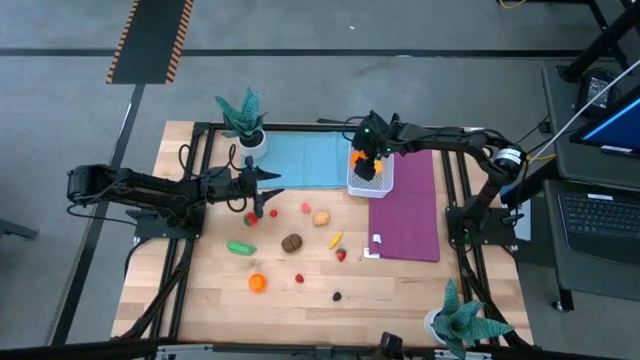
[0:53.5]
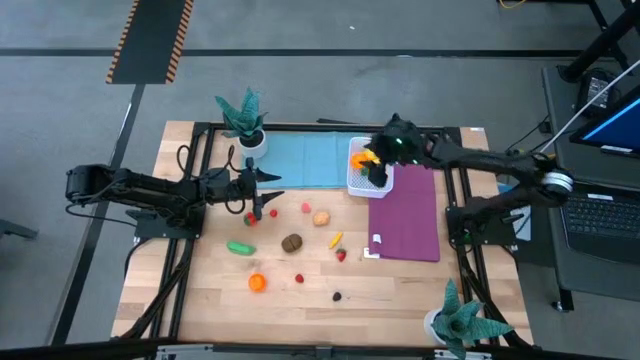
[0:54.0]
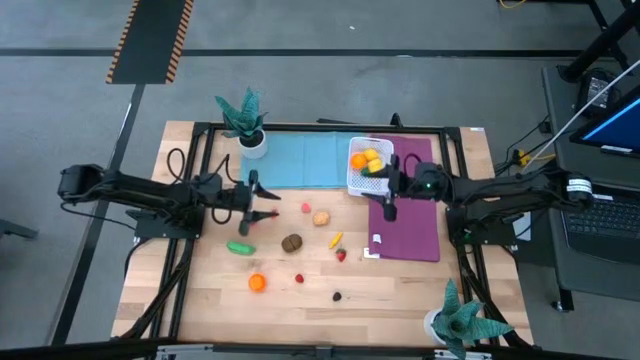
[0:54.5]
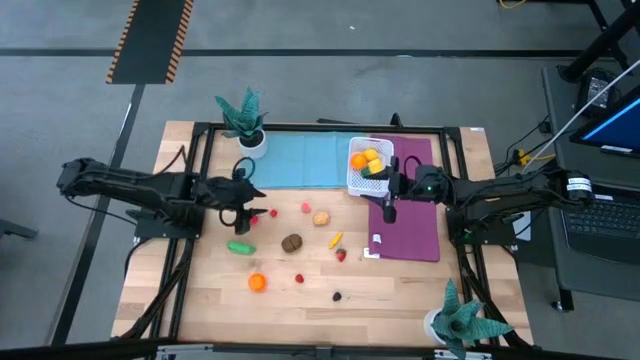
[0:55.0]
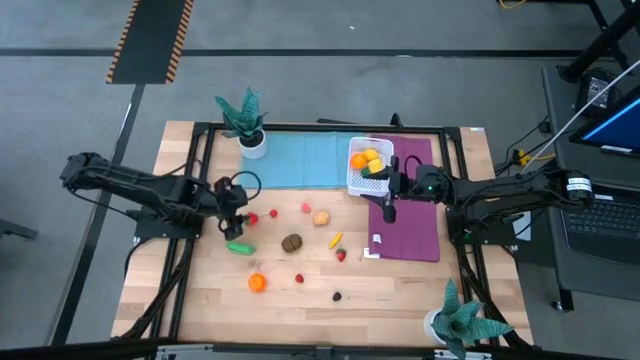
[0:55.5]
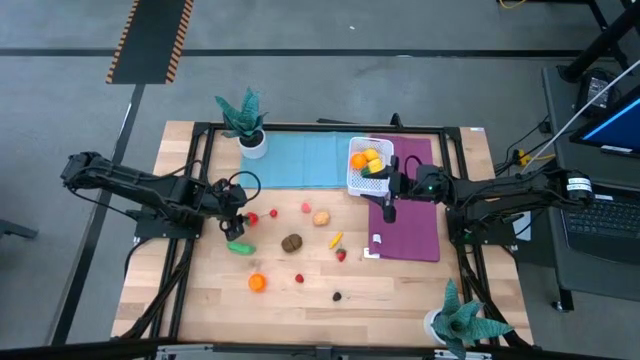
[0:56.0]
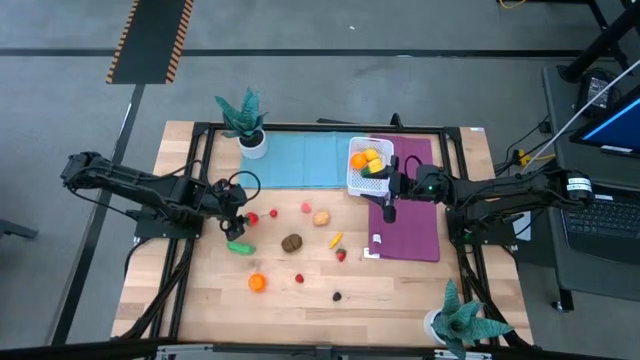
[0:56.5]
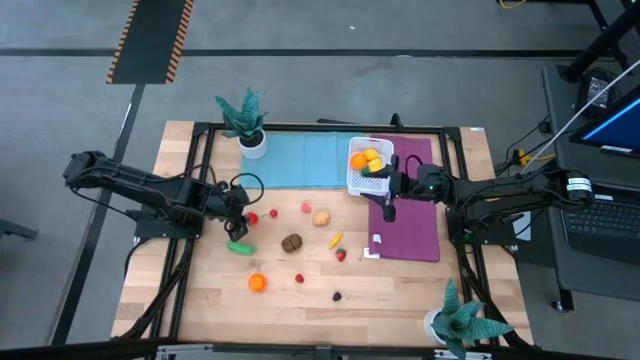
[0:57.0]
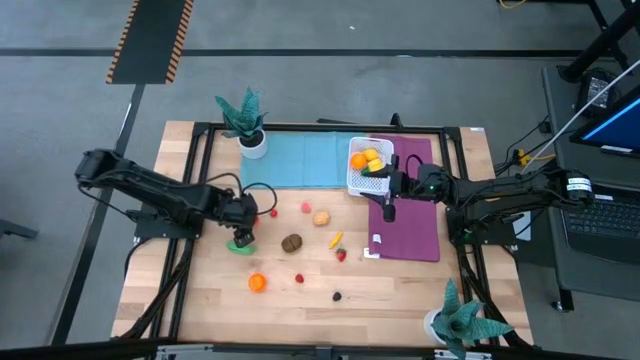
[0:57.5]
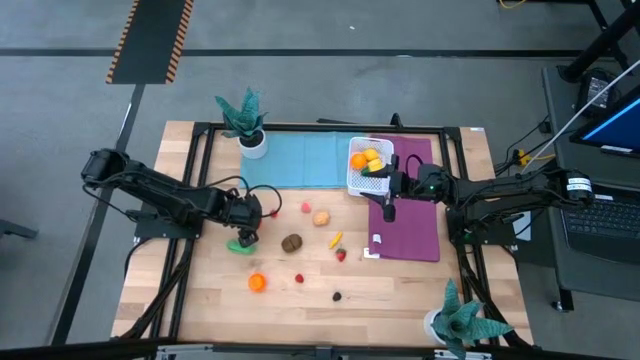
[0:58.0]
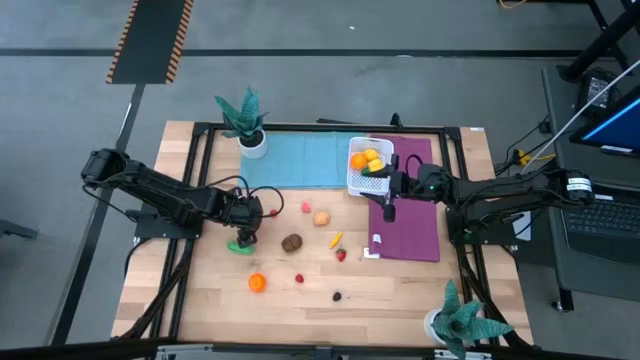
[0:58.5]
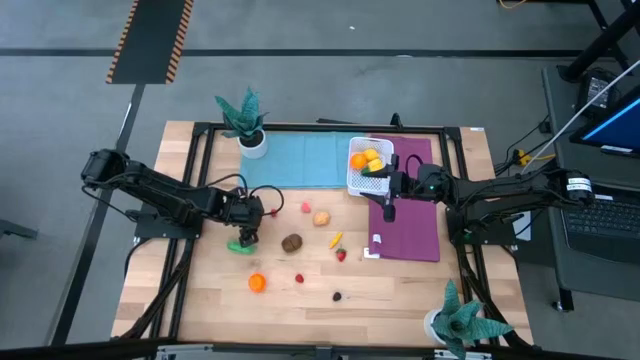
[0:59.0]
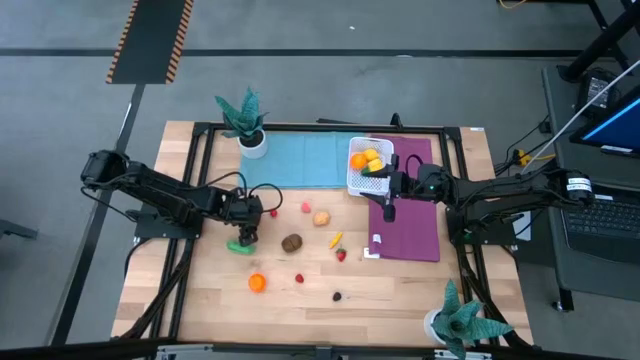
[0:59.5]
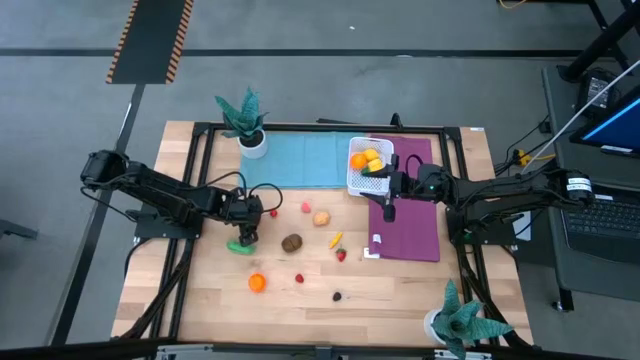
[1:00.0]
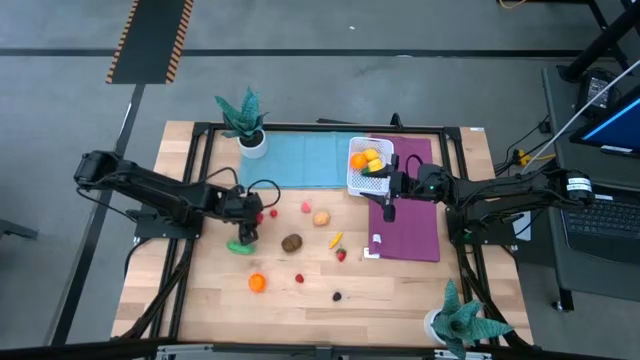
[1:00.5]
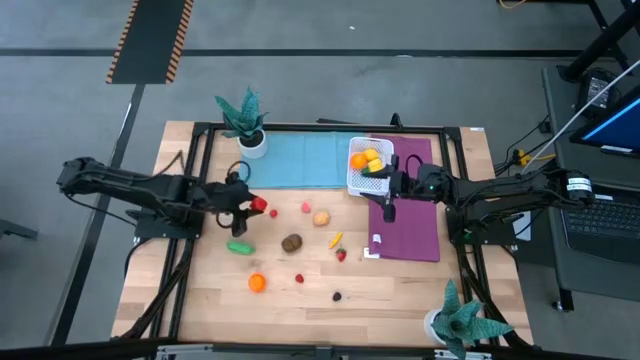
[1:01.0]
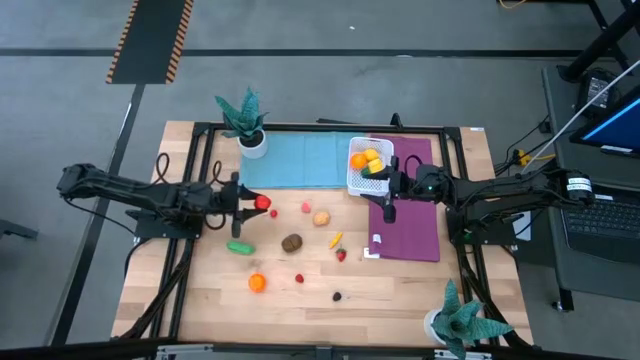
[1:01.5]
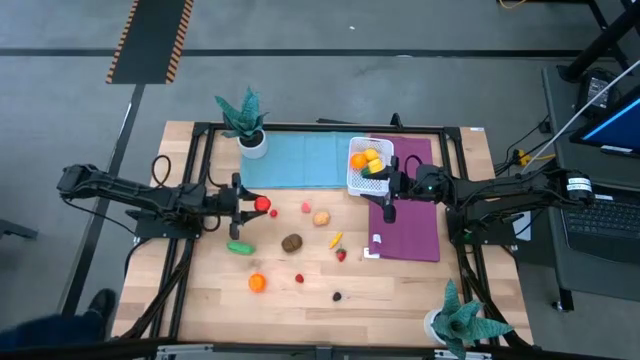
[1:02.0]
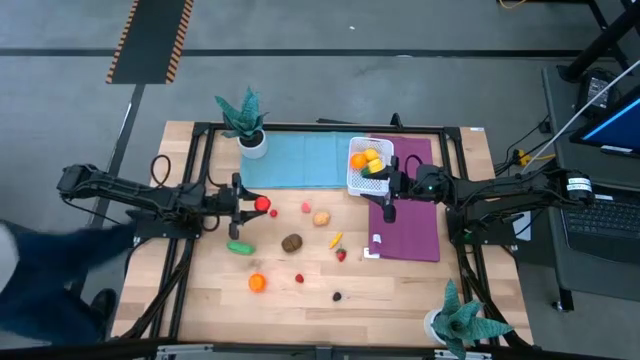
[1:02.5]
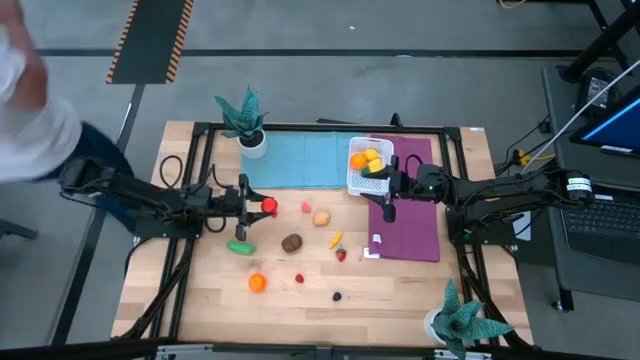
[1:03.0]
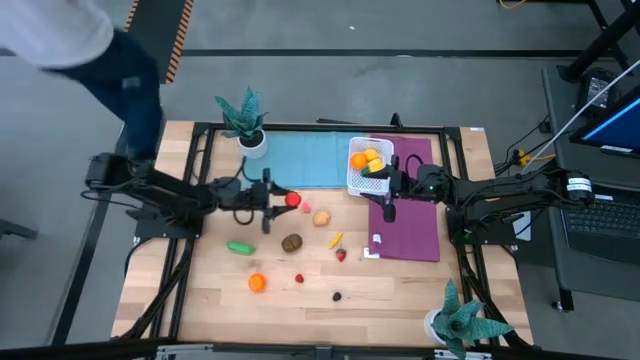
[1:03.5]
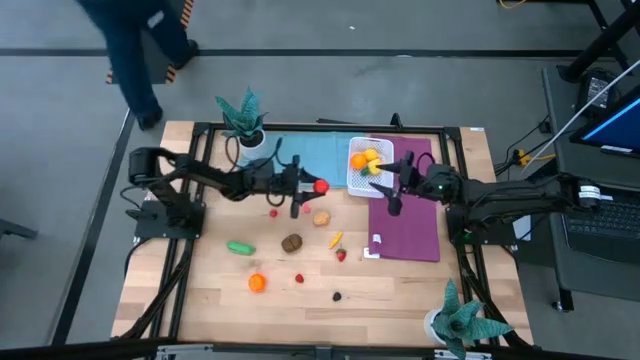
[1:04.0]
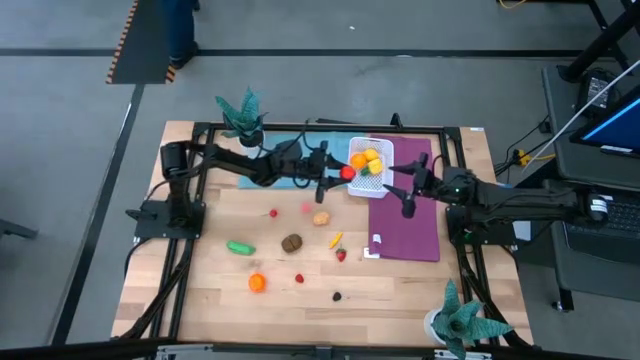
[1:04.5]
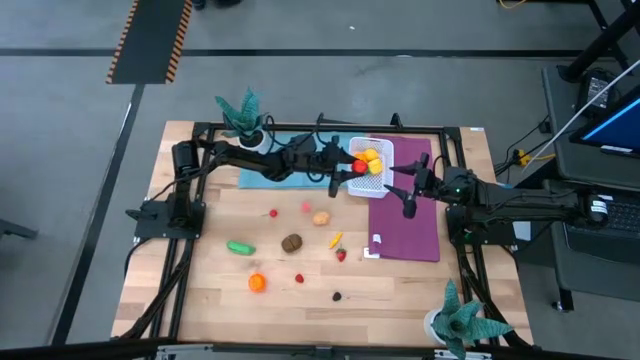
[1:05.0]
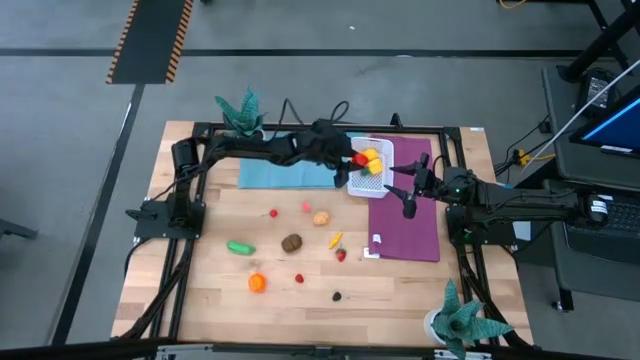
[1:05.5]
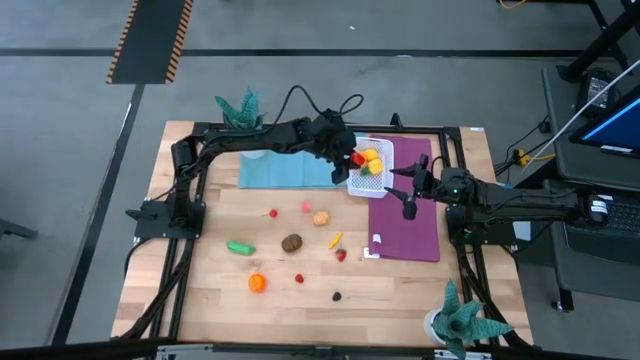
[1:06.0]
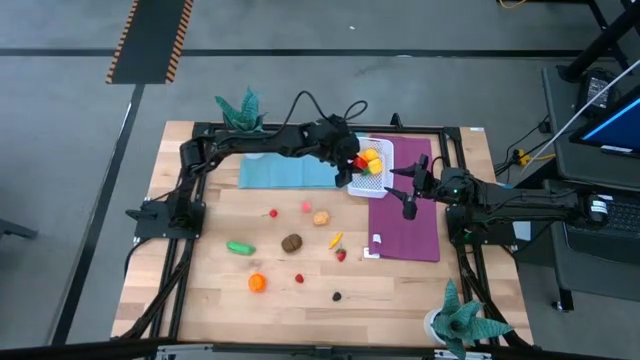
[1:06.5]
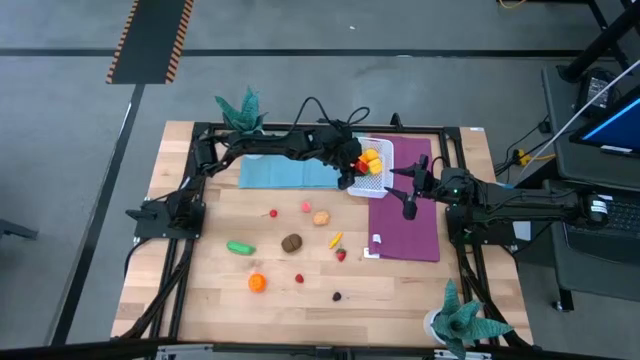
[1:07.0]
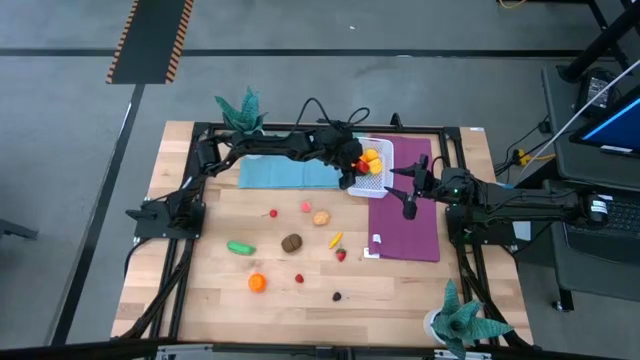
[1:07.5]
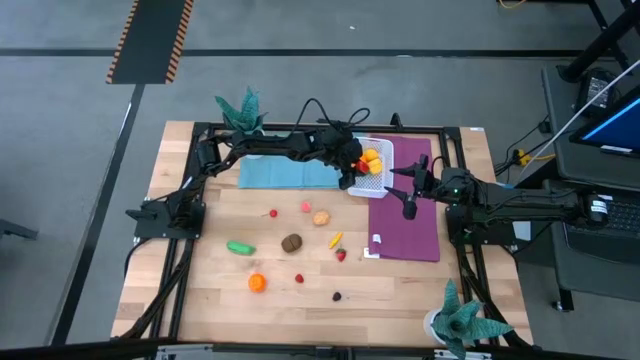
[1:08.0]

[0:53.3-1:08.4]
Task: Pick and placing Produce into tupperware
Put the left red strawberry into the white container

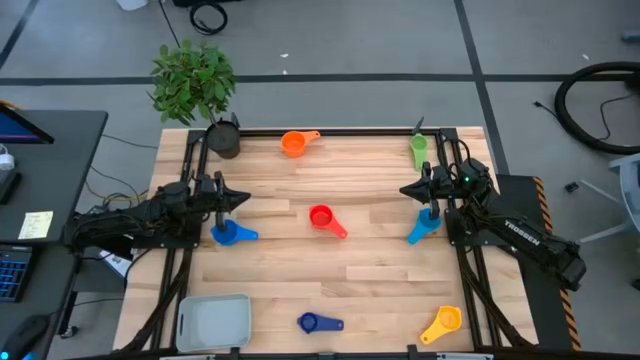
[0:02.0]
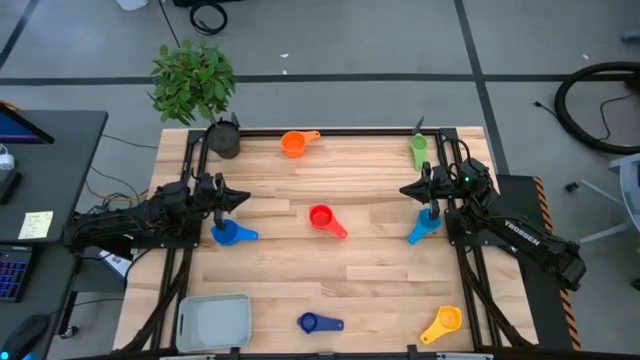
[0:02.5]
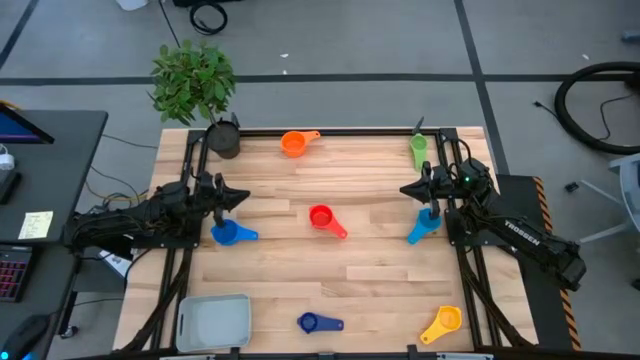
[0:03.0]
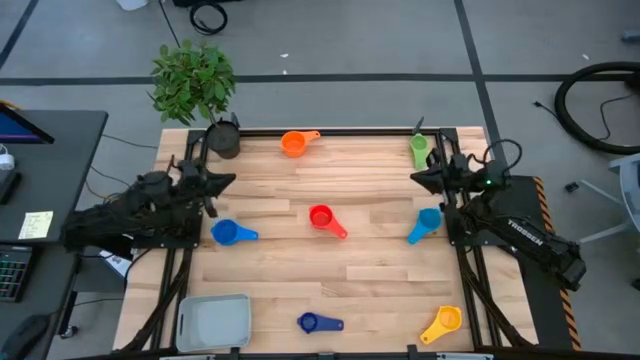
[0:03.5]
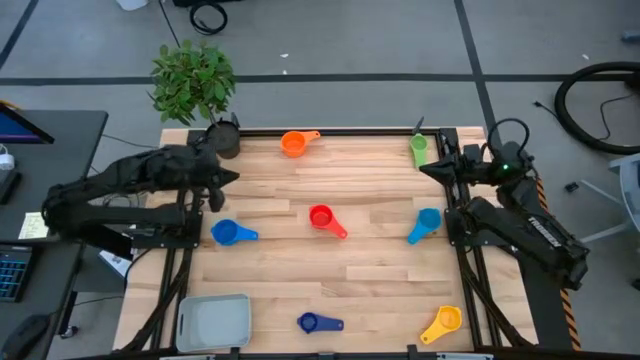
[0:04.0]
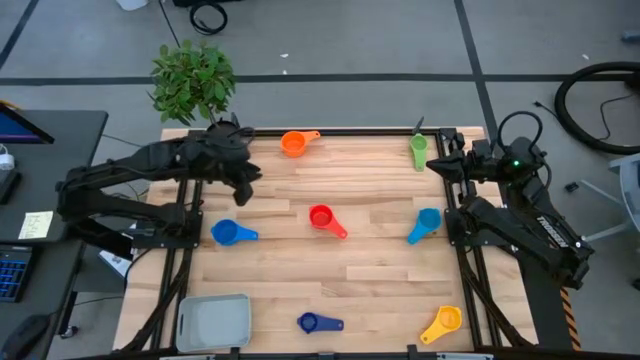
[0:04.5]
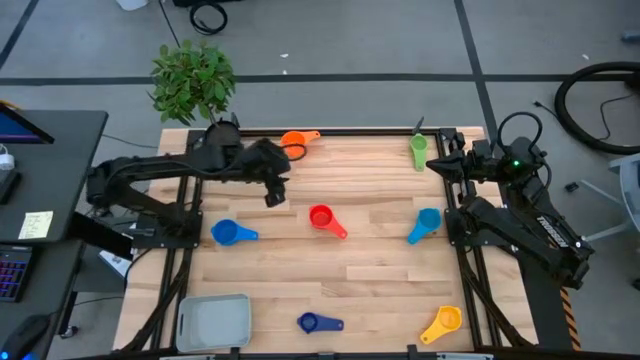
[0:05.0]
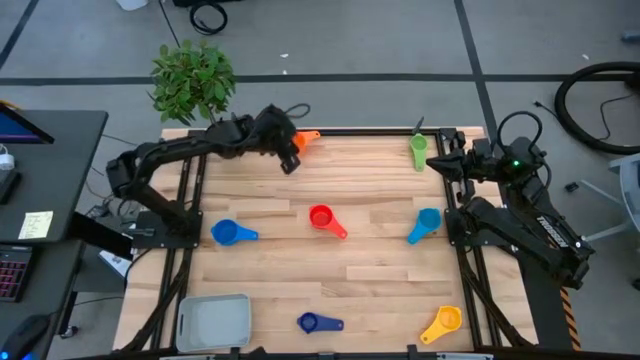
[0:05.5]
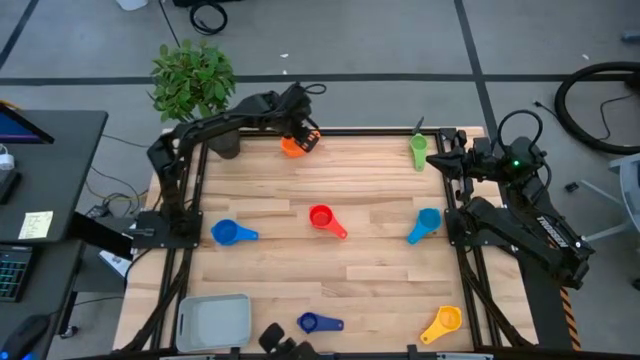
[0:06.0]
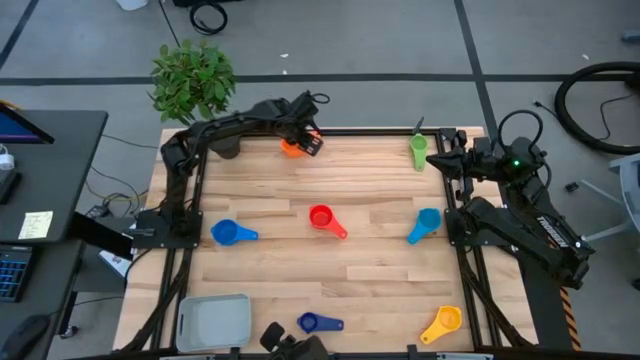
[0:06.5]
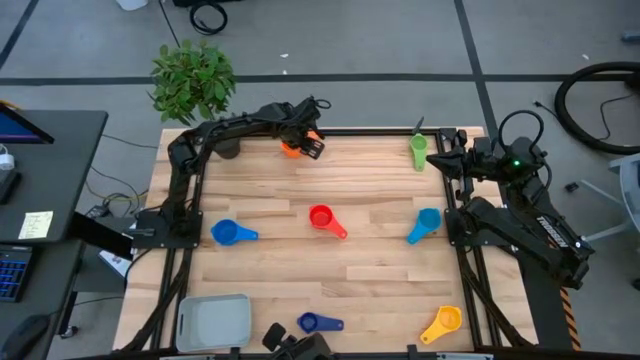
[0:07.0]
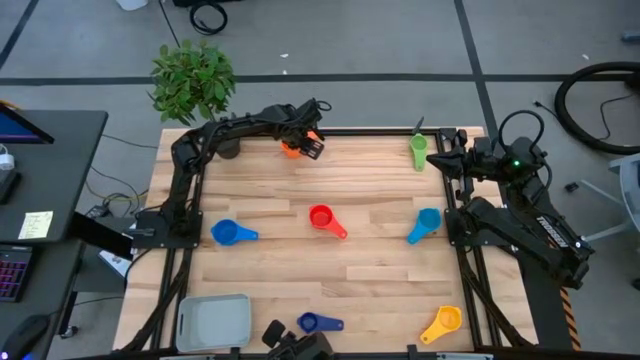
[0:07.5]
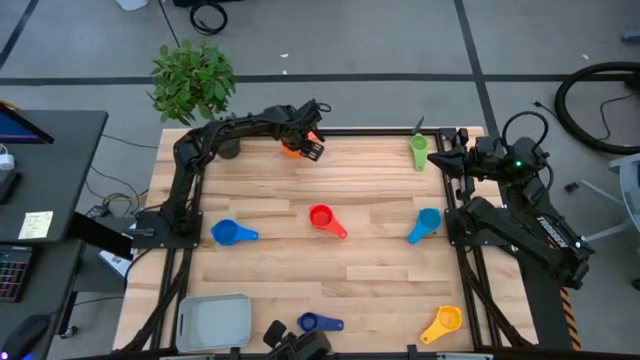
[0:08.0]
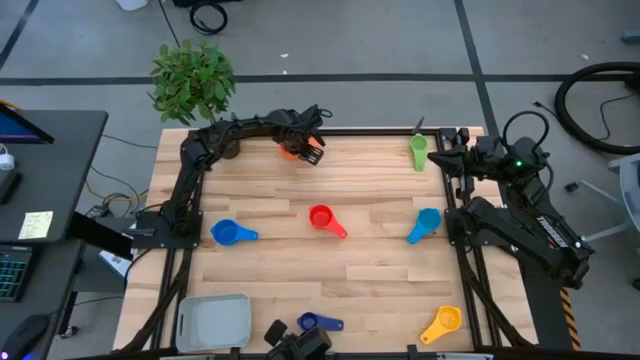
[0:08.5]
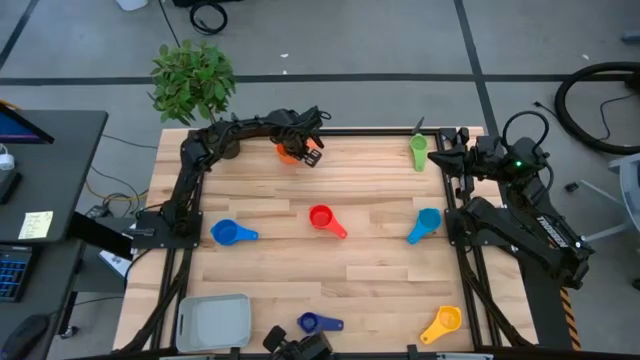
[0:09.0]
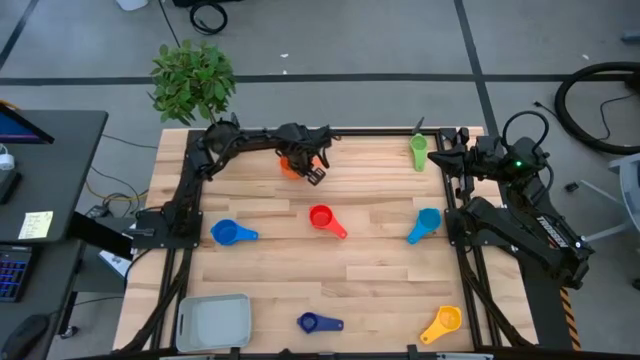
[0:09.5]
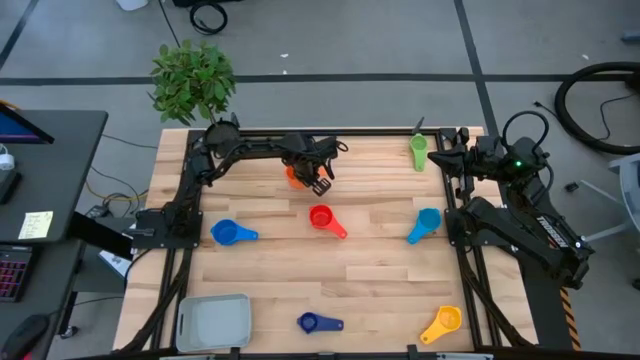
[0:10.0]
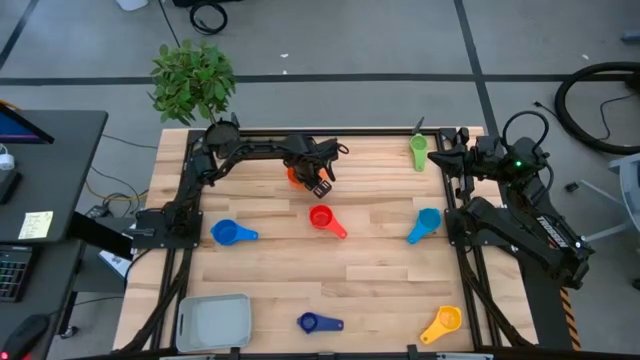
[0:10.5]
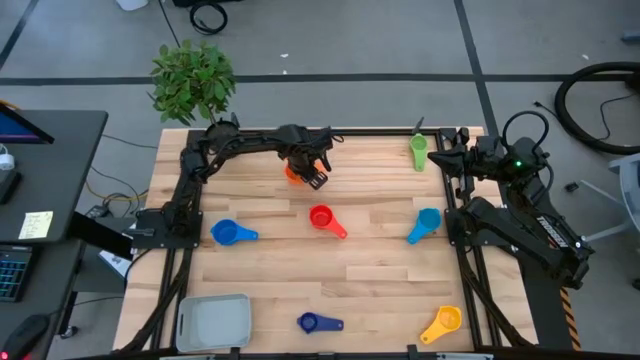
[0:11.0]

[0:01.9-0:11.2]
Task: Nest measuring cups in basket
Adjust the orange measuring cup
